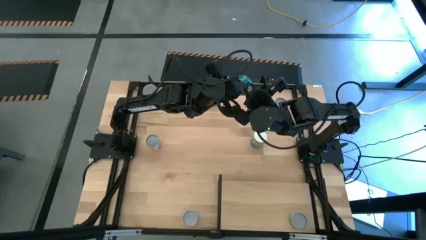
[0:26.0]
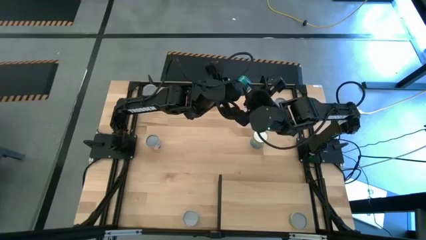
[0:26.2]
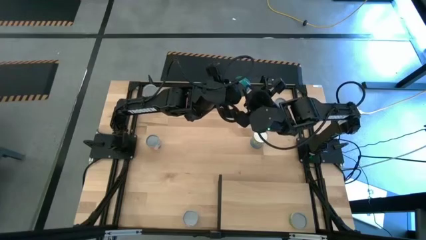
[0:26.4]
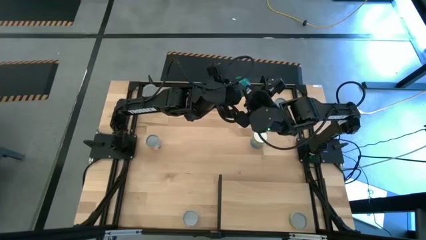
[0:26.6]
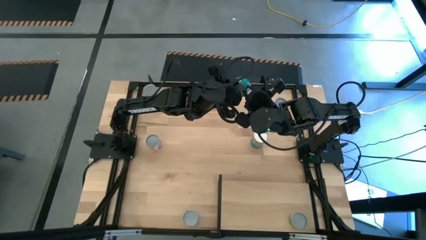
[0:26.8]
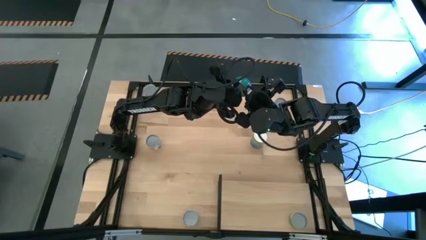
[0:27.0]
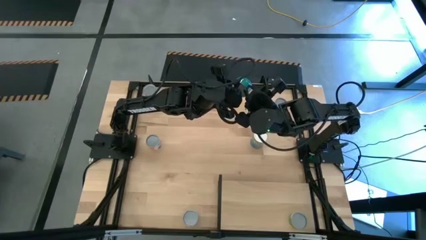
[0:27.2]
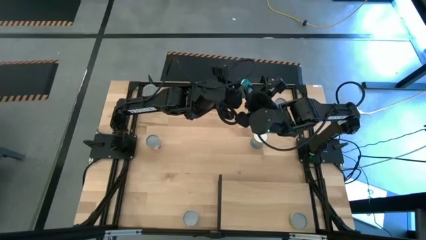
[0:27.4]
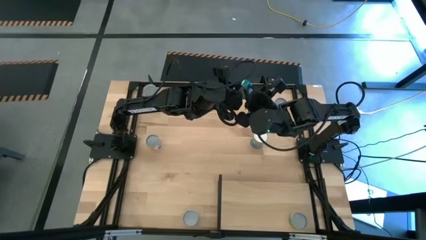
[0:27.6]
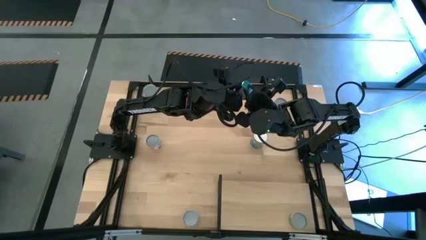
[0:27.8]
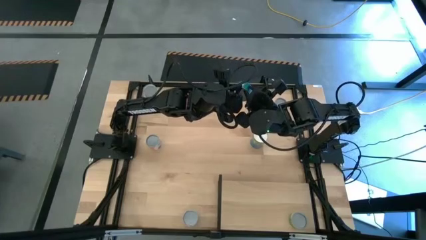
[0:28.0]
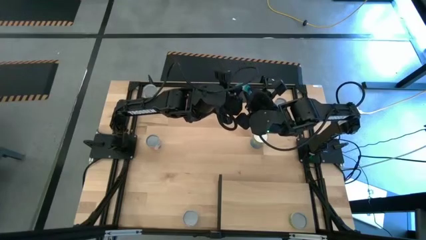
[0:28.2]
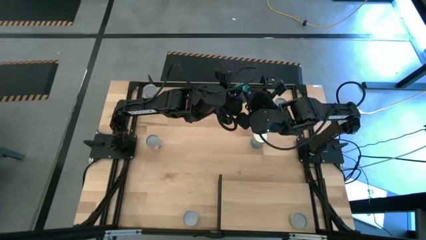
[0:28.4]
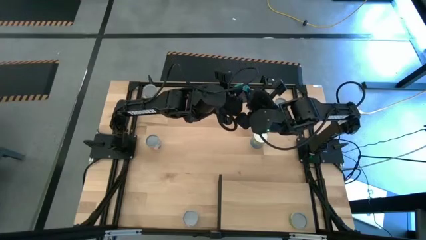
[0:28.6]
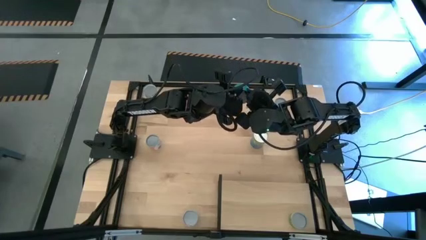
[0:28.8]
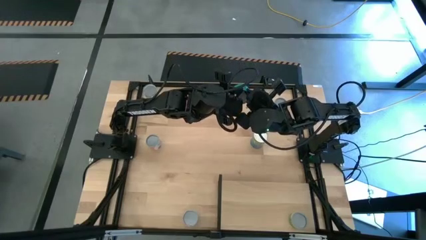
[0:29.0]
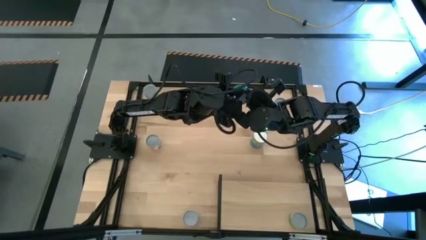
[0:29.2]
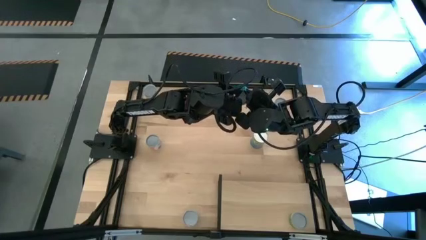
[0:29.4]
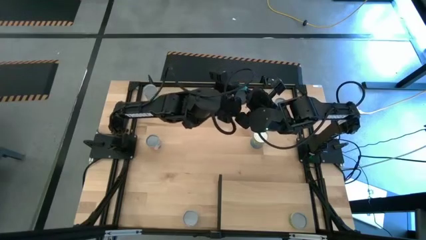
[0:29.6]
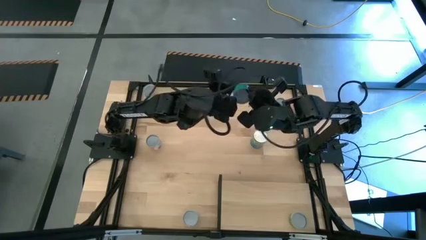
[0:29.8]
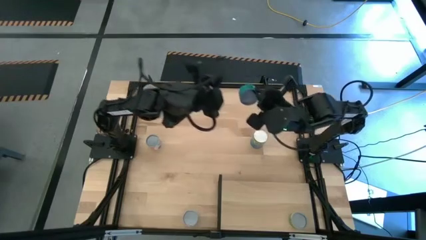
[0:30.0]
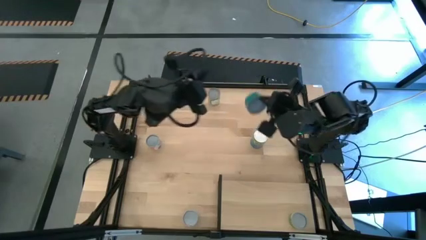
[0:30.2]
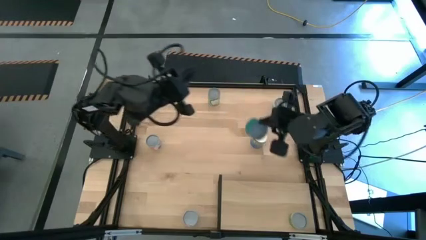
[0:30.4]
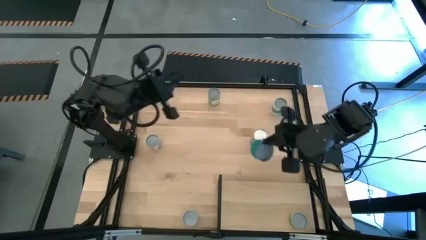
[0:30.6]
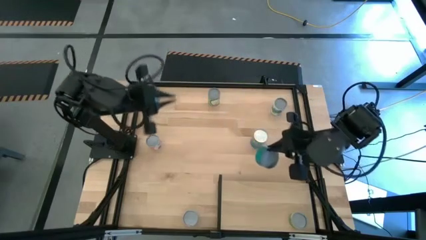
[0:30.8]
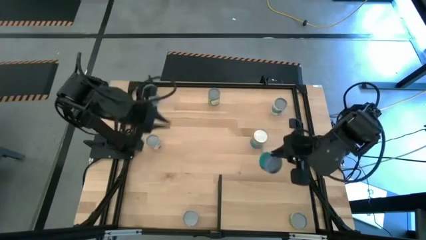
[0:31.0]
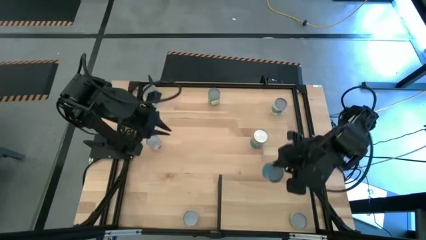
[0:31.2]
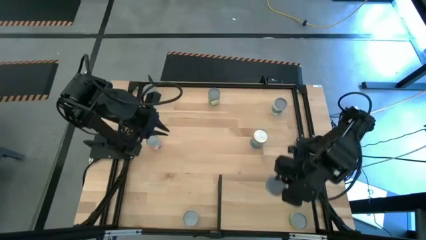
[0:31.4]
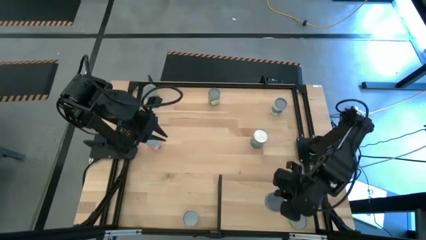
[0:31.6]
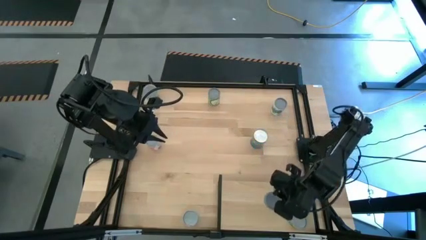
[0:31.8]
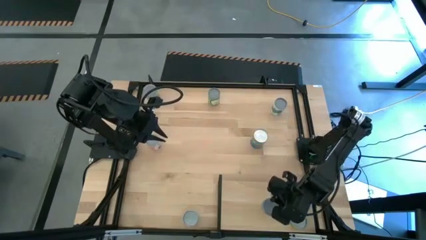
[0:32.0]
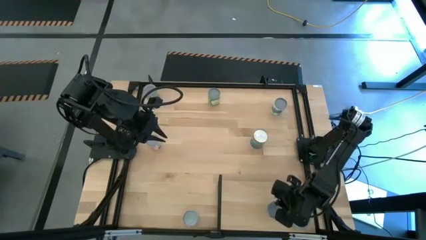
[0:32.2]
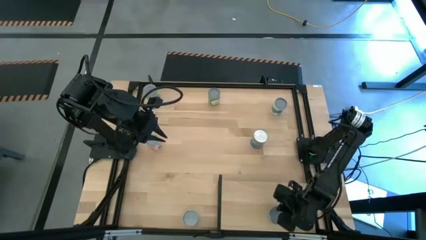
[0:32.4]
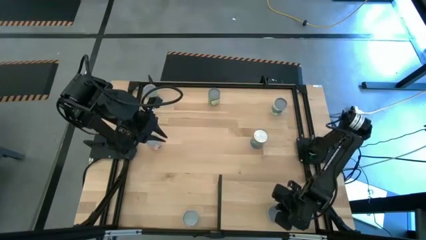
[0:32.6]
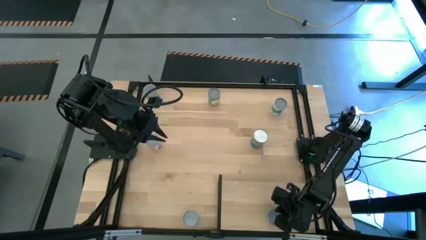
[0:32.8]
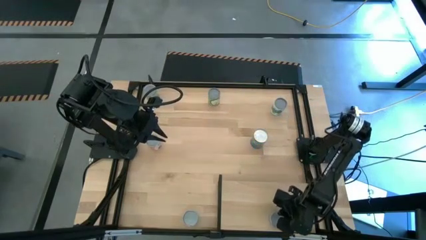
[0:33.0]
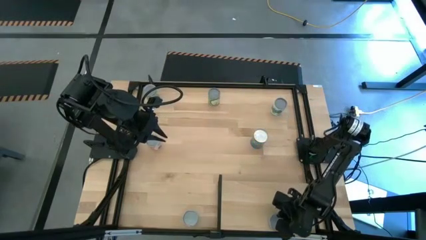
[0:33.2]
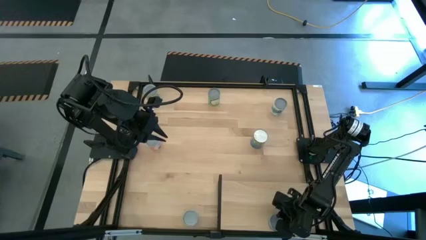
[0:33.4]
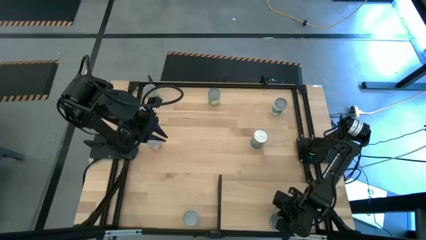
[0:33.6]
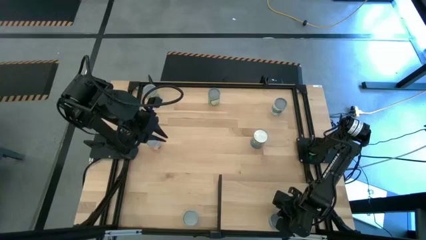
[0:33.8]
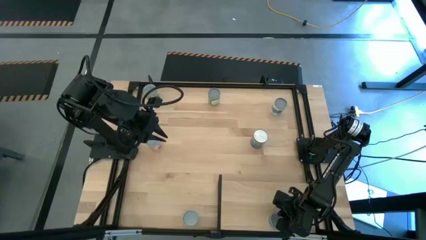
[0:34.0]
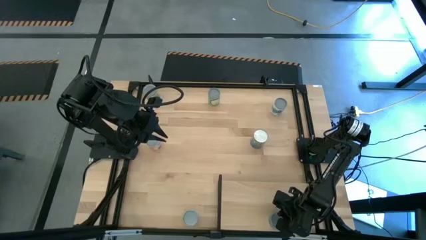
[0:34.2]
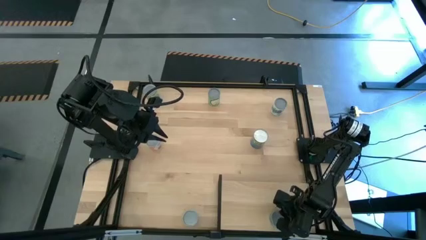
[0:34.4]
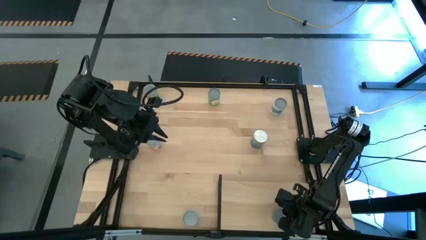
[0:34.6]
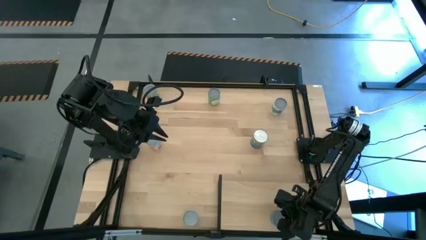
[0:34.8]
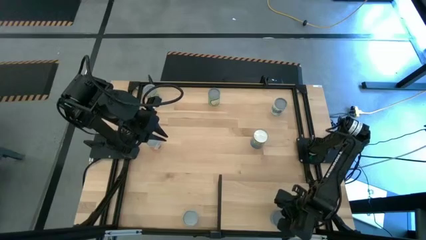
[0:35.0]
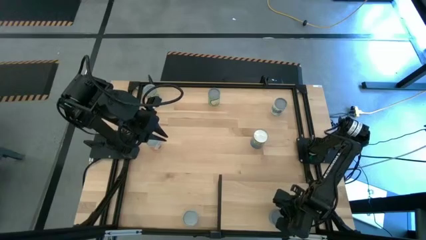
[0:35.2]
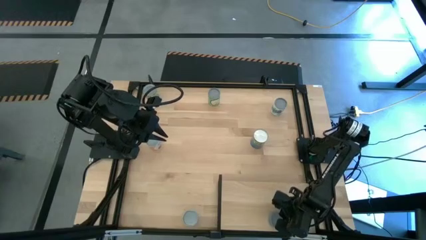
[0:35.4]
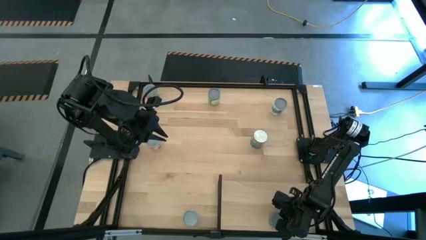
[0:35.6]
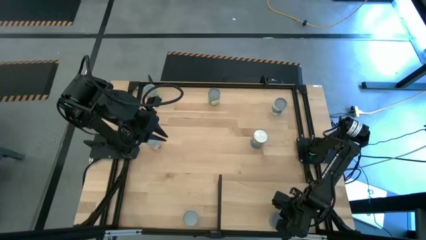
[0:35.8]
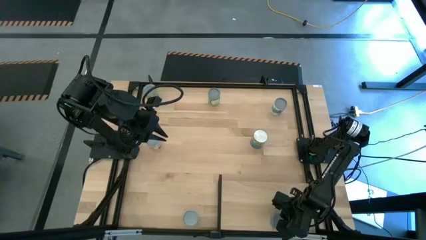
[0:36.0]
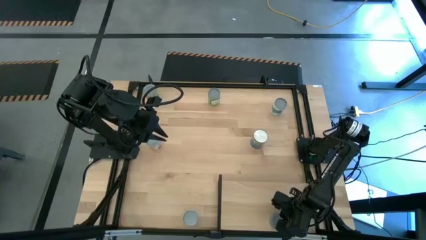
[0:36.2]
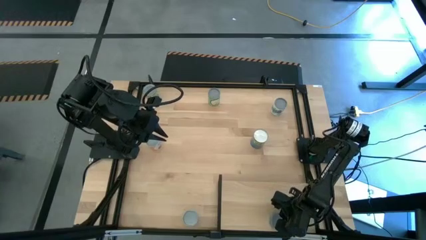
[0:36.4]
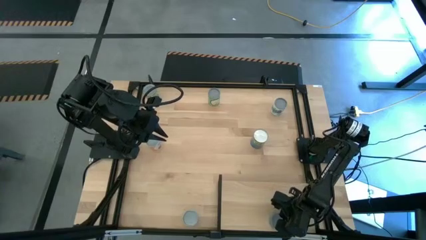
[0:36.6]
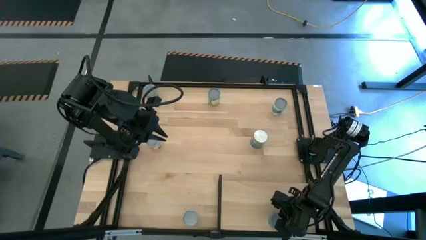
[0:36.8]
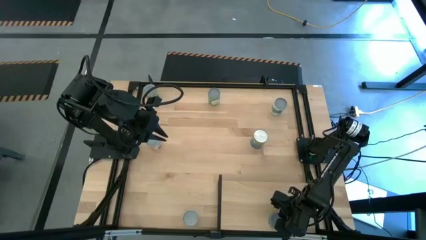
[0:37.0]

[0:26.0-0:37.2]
Task: Pick and place cans onto a shelf
Put the canned tuna on the shelf

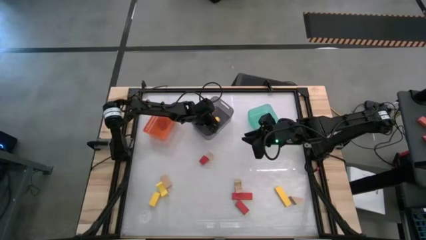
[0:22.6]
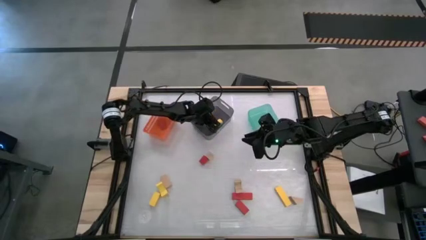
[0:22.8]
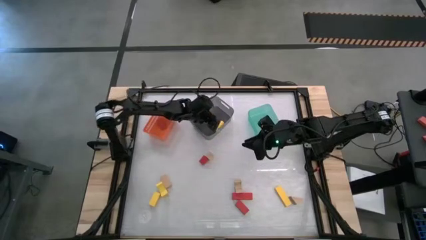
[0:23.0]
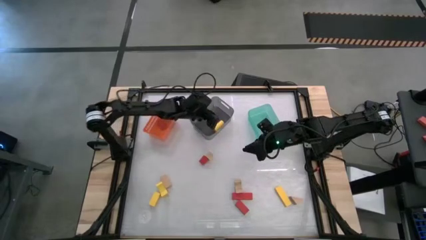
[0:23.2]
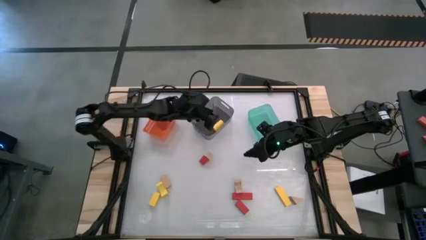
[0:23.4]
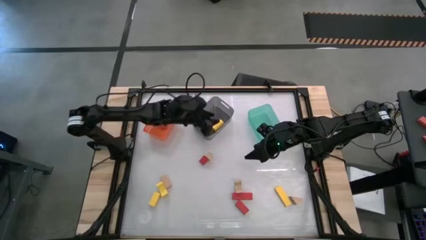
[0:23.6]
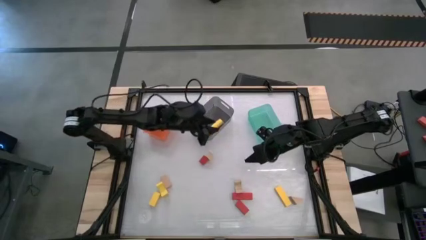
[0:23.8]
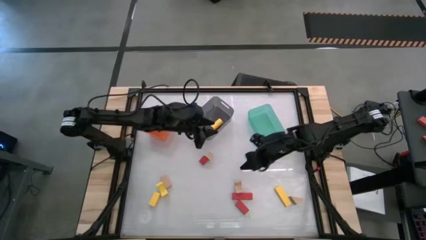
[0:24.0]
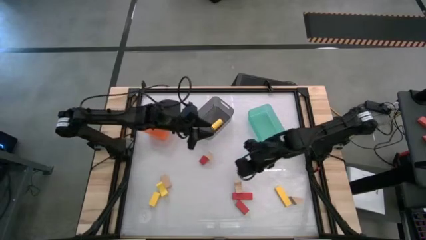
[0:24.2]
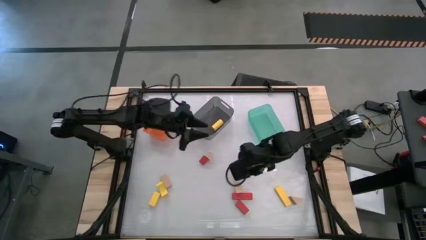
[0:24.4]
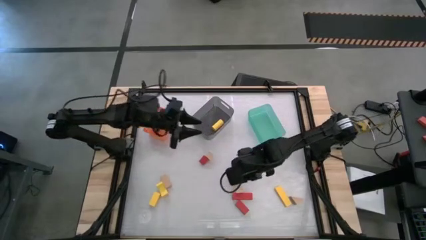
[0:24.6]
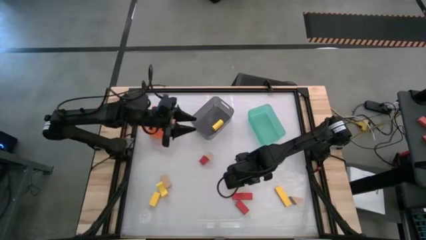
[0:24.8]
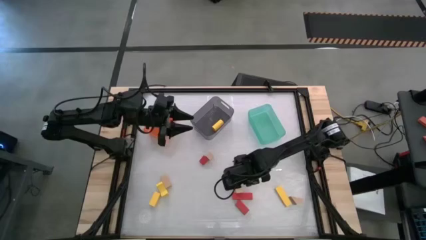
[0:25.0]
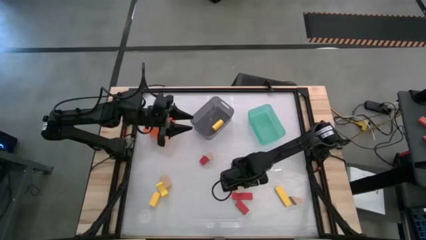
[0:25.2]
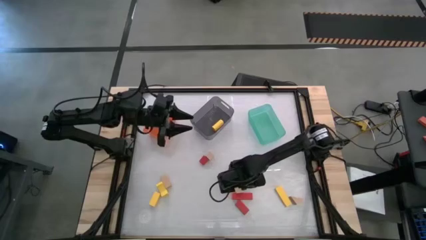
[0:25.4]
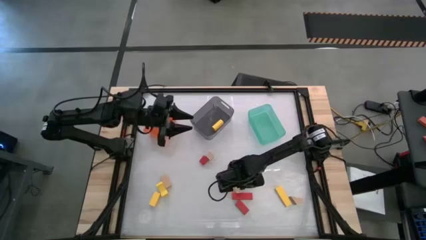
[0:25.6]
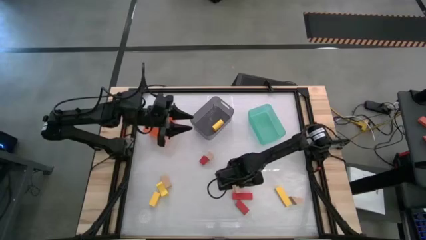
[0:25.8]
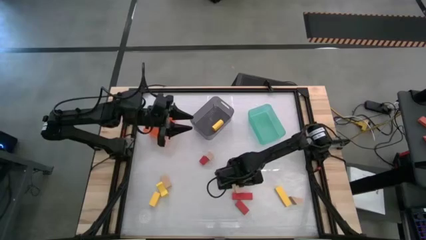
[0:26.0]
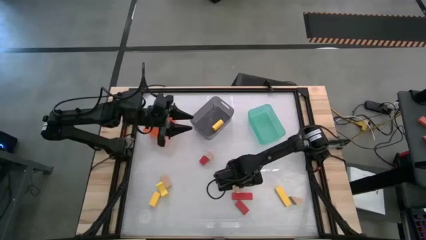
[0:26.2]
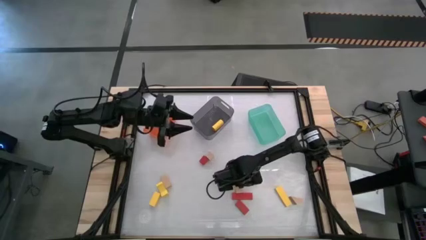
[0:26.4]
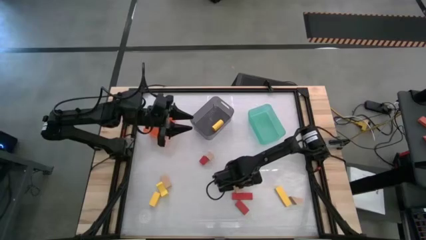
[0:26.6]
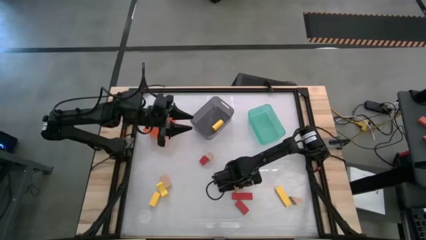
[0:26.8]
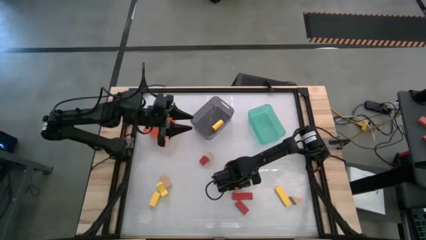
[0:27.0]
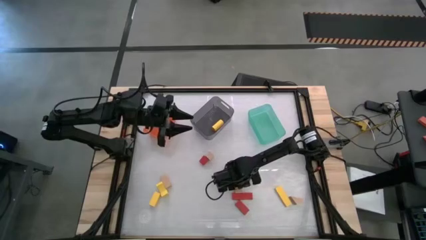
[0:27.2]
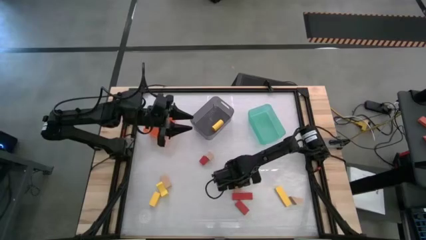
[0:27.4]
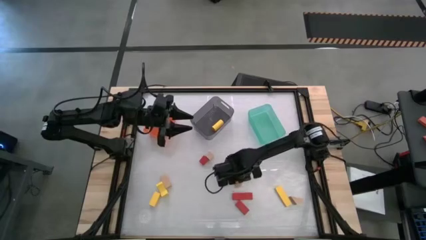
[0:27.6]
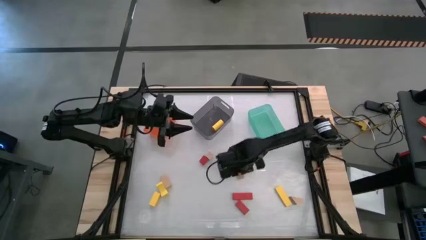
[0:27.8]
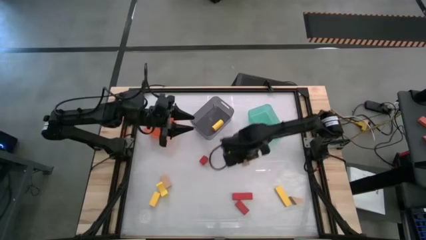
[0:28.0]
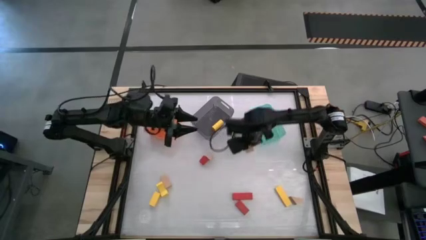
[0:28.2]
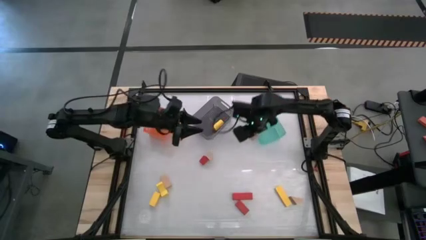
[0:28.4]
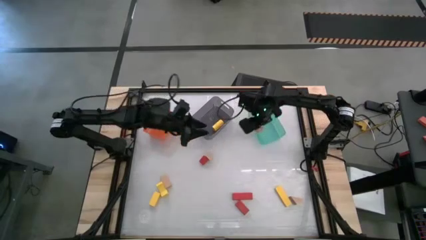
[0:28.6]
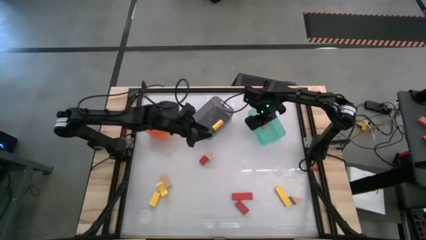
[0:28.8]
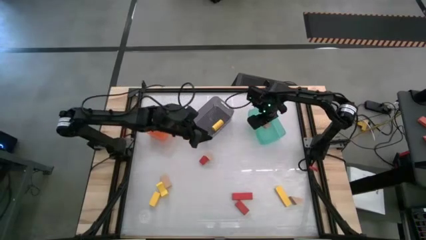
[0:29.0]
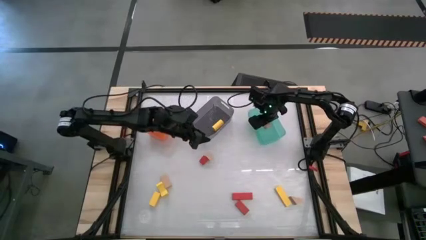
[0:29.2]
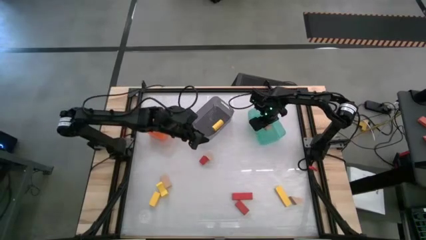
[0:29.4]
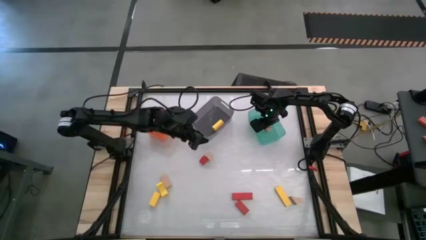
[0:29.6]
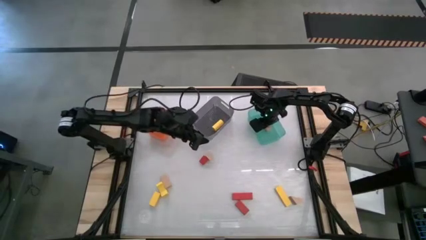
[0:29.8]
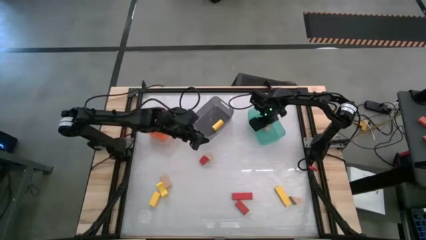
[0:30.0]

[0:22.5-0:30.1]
Task: Sort & place blocks by color
Put the brown block into the blue bin
